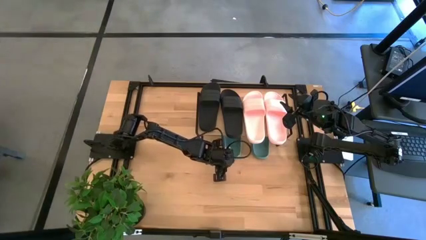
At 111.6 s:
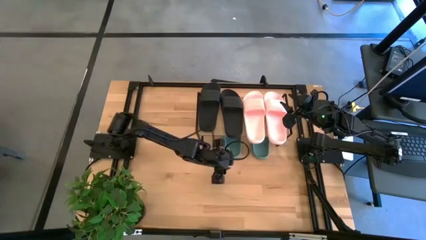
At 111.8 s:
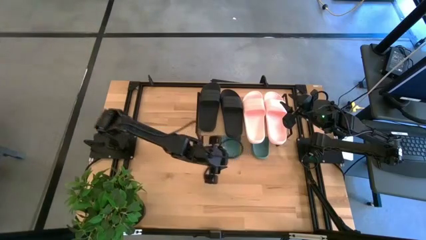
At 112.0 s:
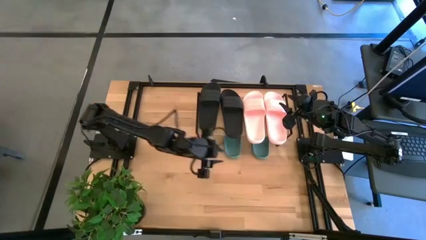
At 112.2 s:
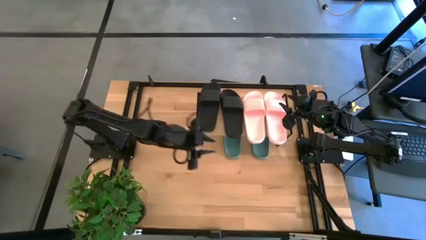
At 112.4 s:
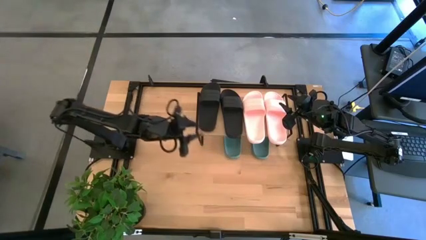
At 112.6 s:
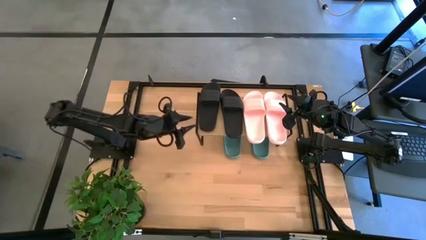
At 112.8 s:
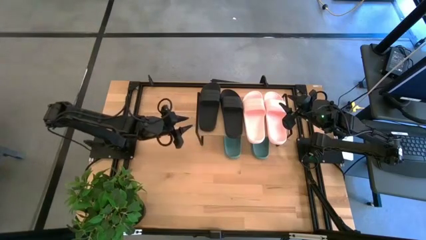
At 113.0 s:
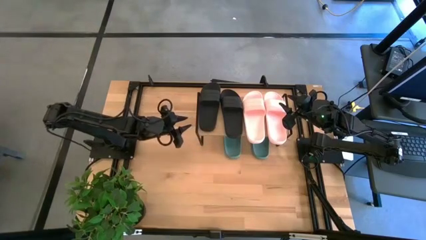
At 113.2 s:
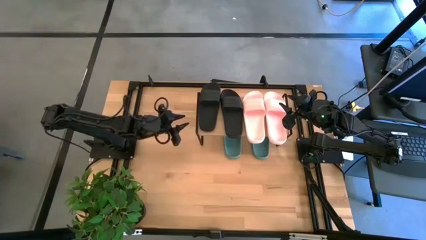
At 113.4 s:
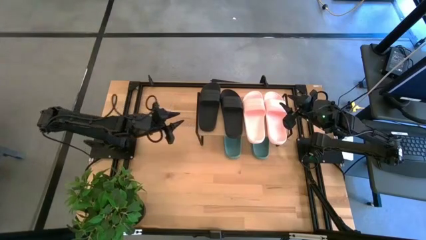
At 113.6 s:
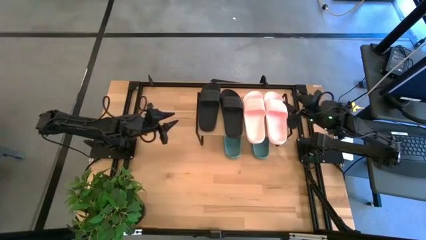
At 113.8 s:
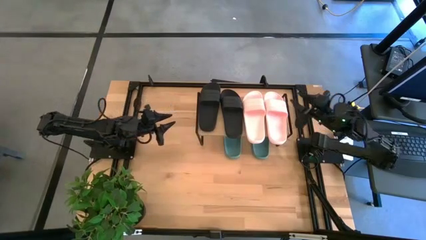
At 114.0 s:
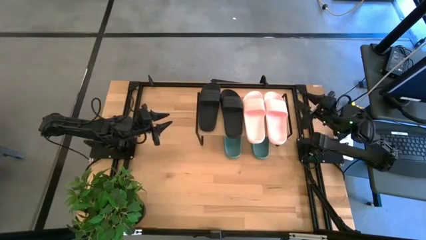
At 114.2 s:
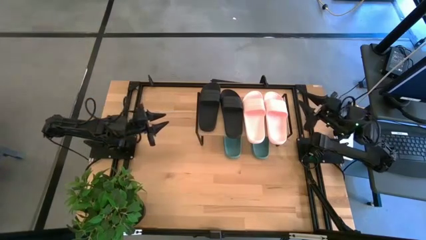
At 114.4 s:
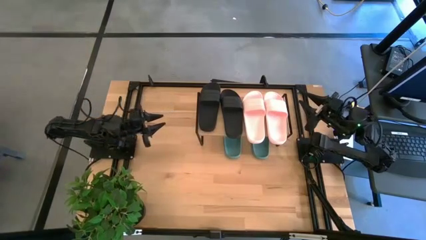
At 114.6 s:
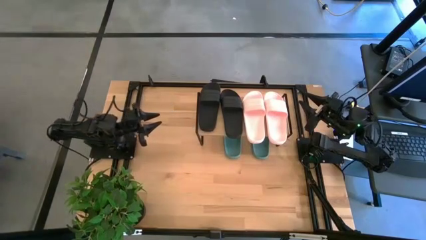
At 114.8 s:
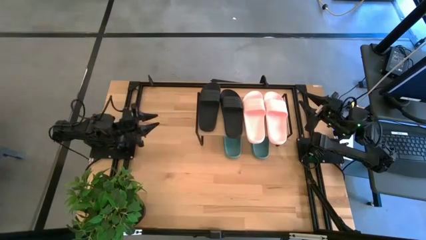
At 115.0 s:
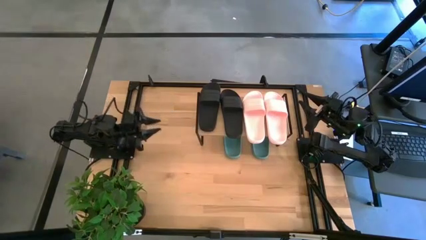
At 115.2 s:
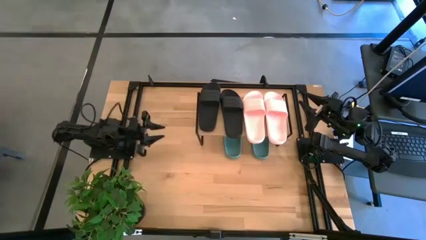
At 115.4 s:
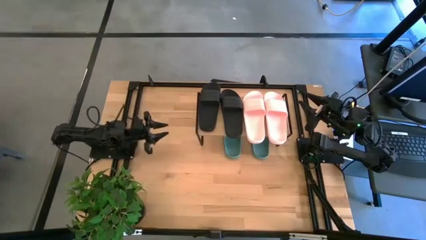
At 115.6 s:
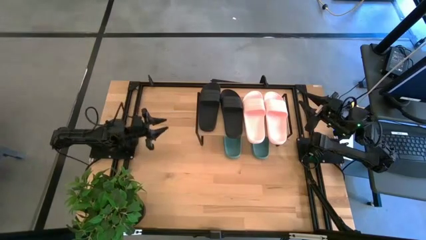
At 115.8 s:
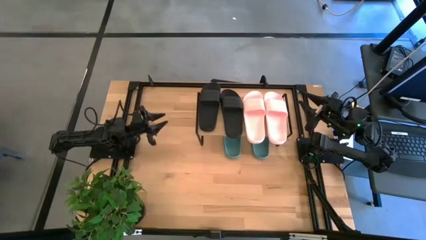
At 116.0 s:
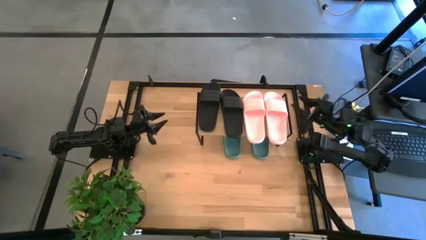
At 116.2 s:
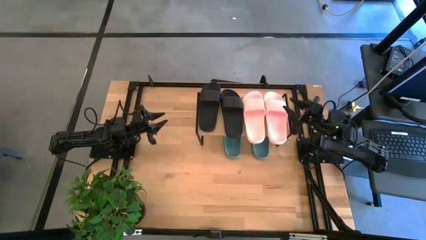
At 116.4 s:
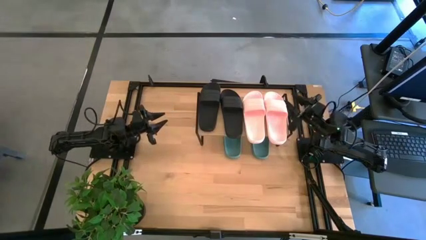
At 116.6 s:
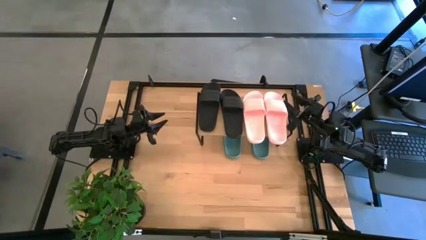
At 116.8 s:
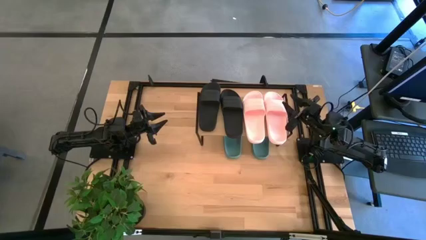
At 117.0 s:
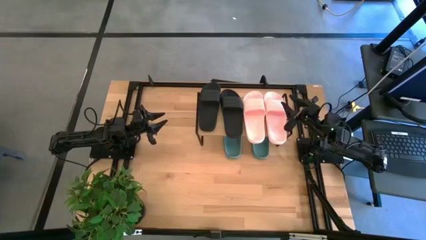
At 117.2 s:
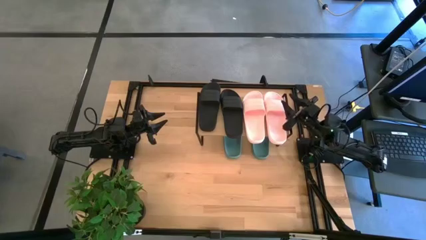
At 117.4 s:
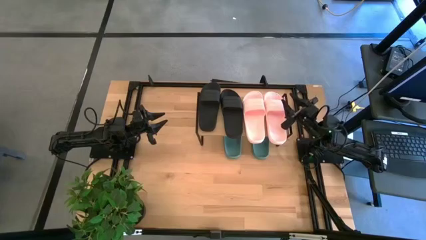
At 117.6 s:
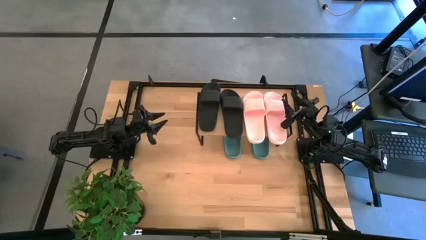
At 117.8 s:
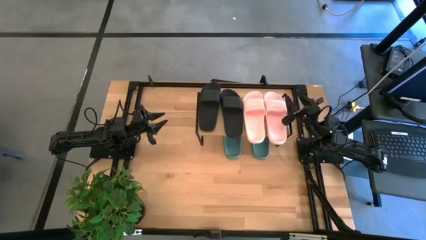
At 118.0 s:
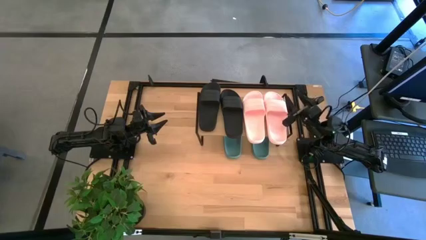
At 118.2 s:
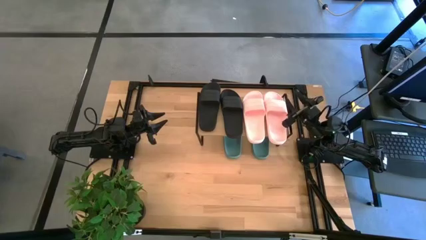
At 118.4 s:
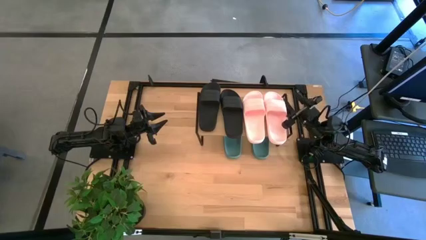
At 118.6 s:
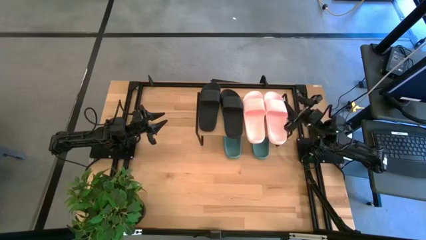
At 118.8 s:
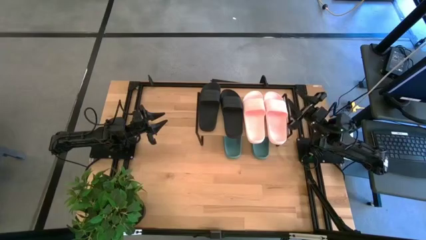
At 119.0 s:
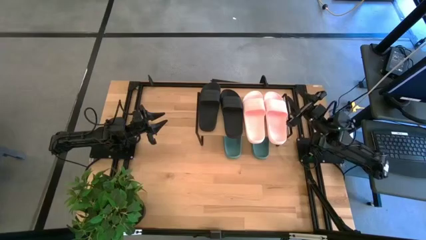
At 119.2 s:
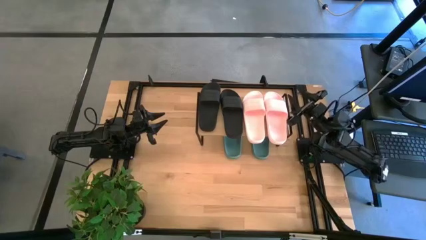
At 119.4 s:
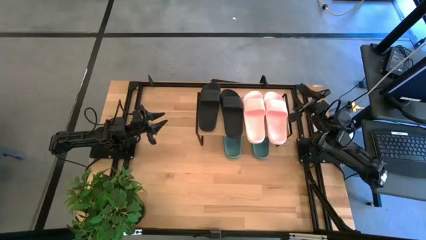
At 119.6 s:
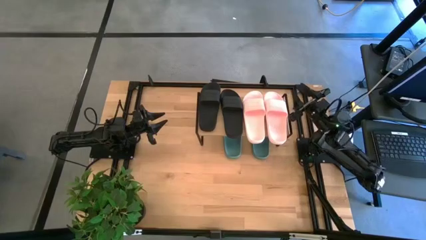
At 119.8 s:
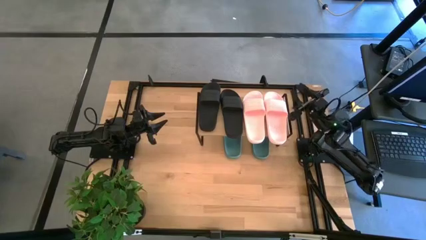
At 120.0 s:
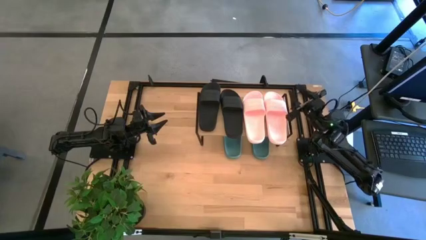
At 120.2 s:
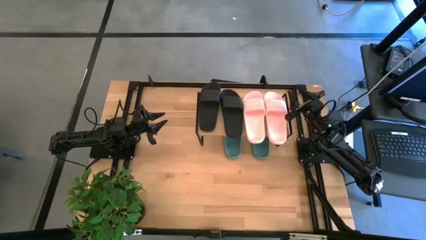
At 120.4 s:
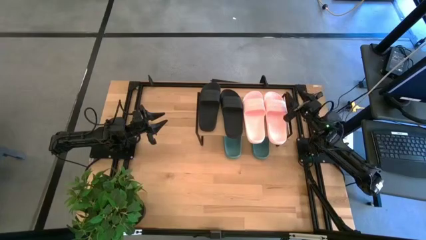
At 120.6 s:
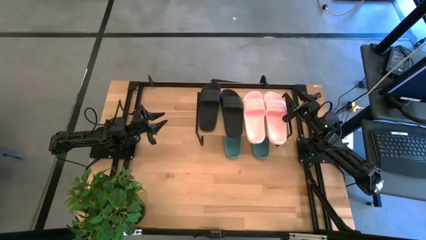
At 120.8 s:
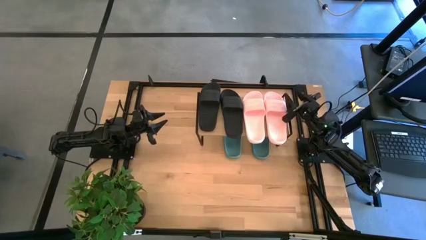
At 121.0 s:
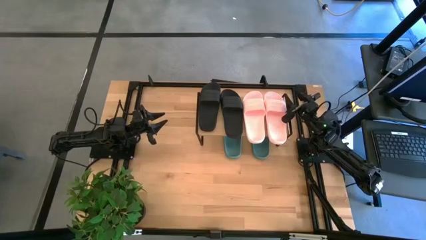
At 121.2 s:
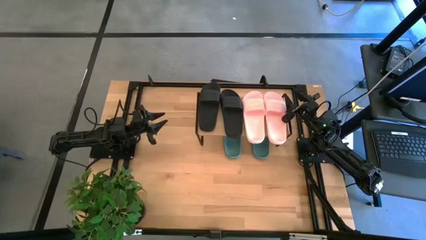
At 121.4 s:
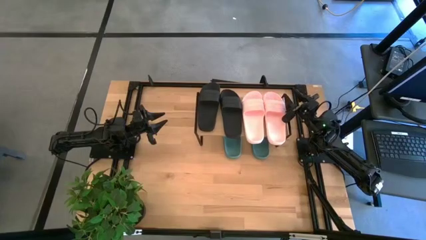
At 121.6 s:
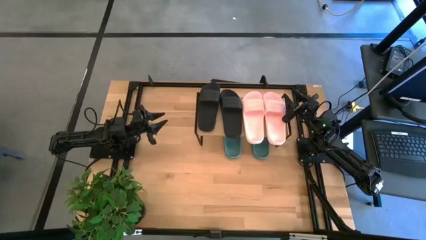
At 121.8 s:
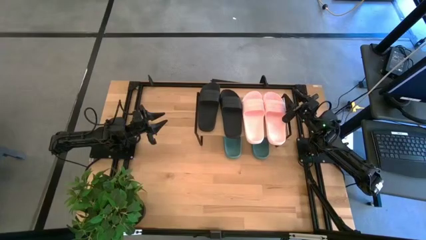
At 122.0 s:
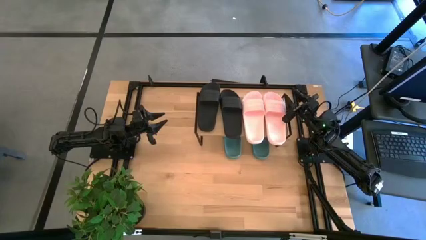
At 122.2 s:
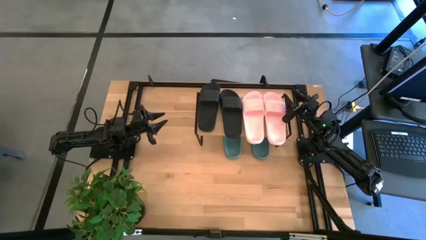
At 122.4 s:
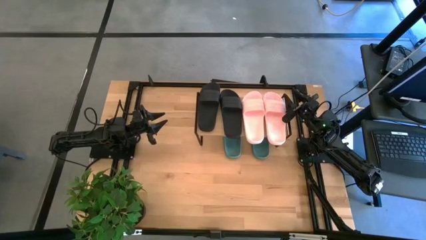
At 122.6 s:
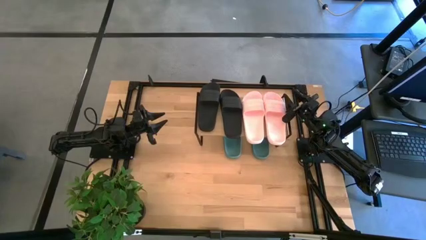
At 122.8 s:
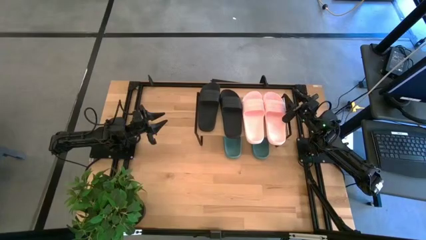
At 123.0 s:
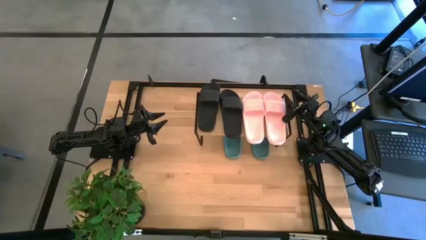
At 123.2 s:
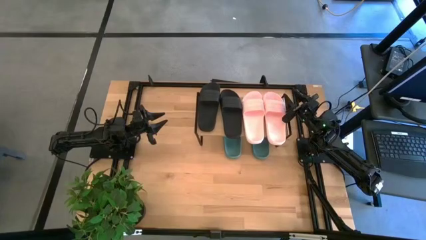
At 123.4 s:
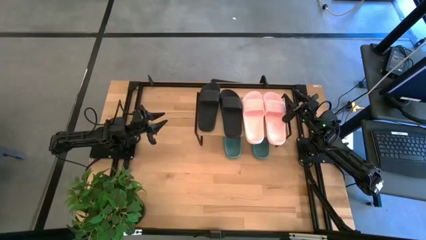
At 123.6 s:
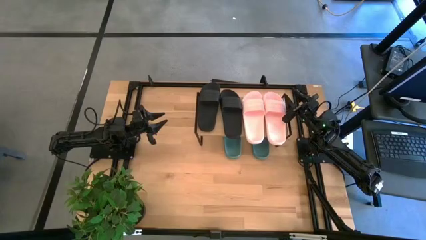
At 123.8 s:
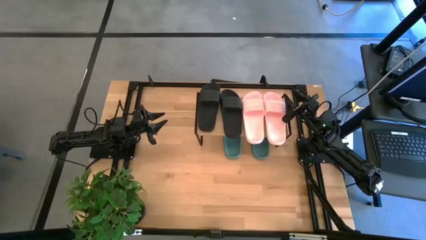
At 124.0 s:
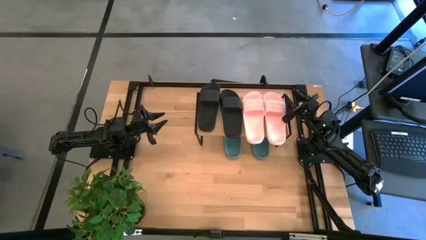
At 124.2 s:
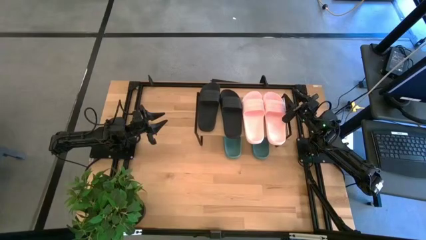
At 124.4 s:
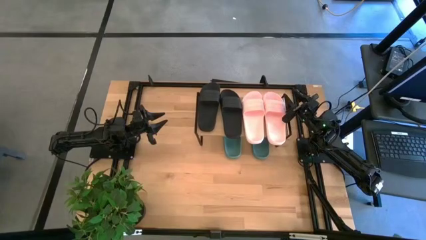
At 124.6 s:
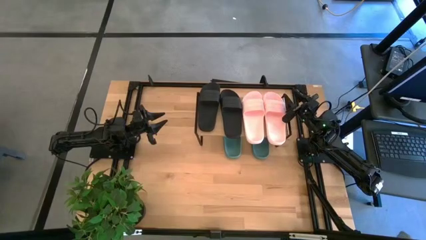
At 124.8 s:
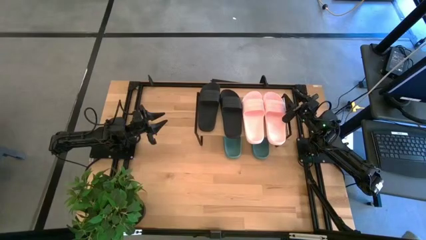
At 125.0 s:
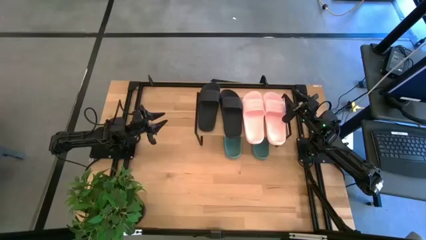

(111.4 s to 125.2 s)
Task: Pick and place slides into the shelf
Return to Home Position
